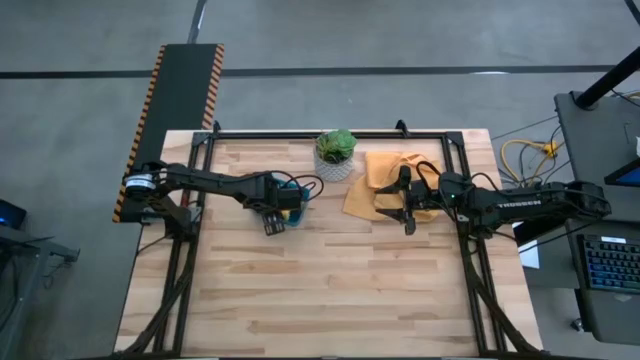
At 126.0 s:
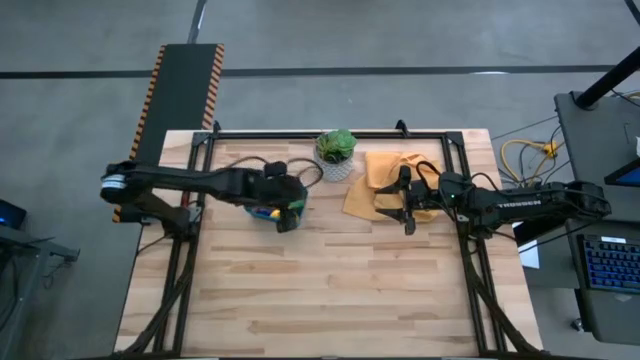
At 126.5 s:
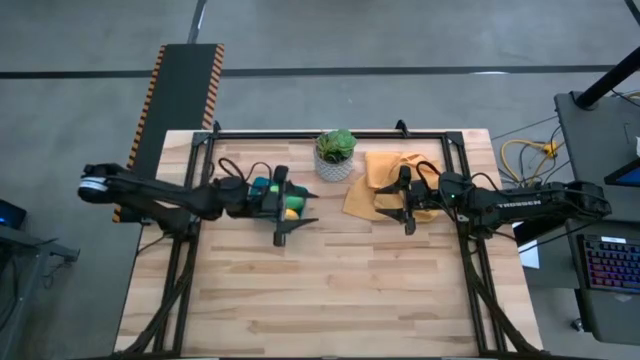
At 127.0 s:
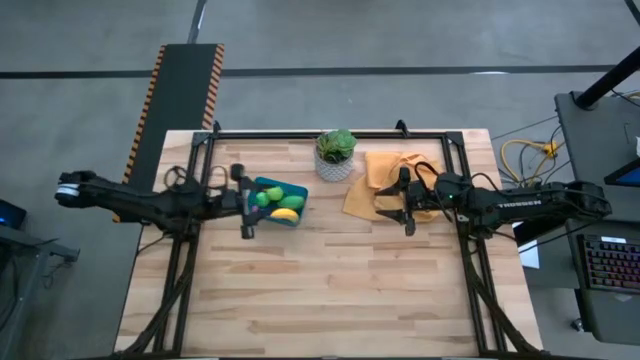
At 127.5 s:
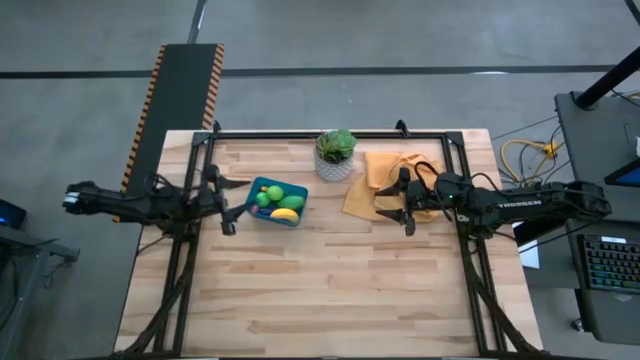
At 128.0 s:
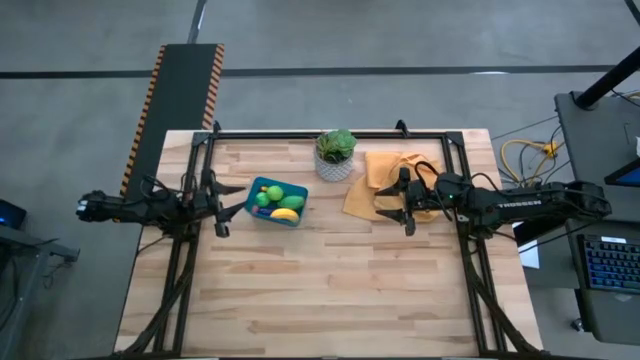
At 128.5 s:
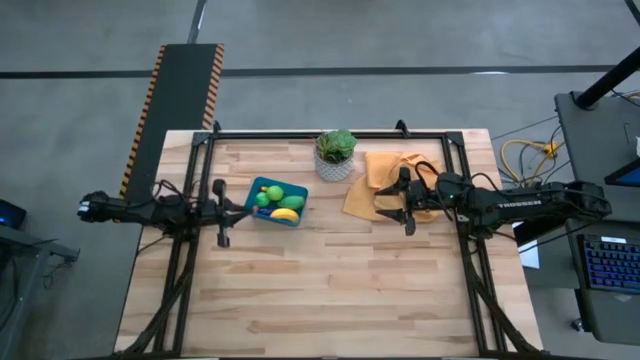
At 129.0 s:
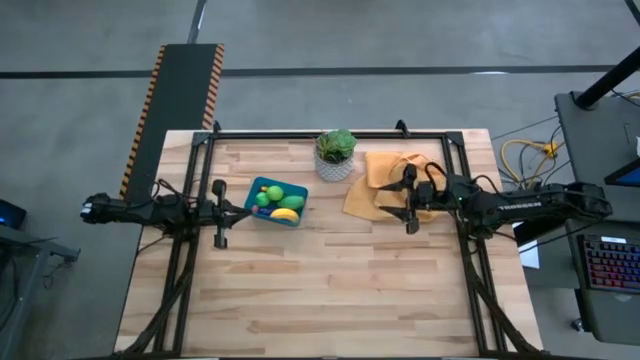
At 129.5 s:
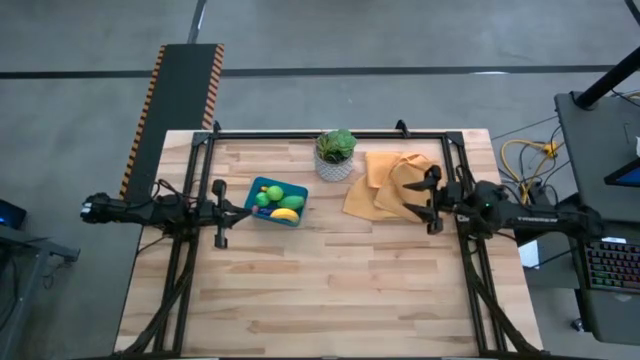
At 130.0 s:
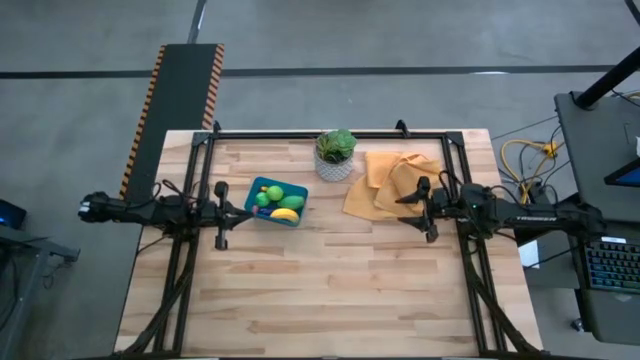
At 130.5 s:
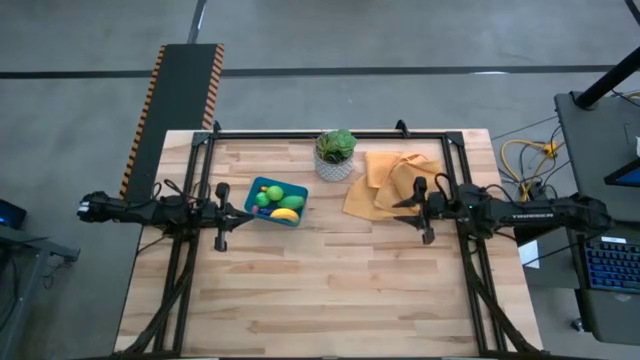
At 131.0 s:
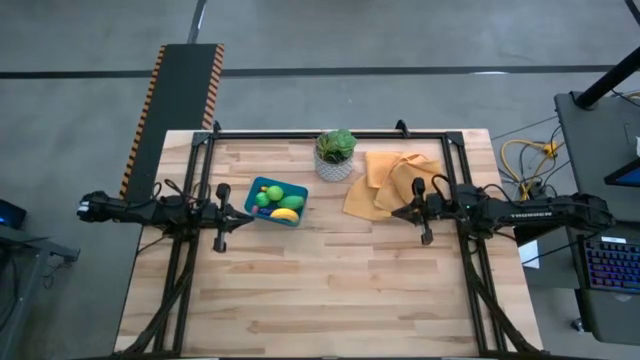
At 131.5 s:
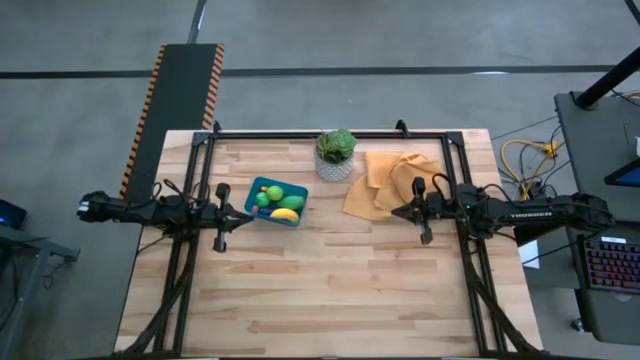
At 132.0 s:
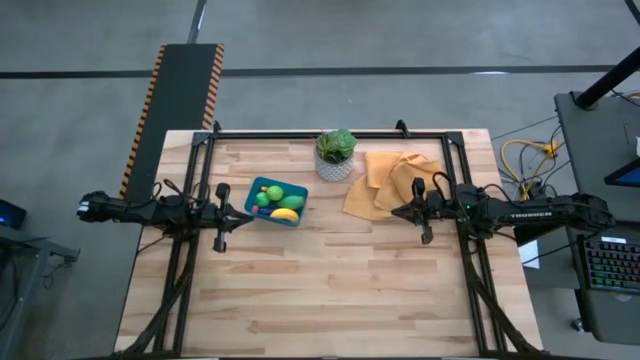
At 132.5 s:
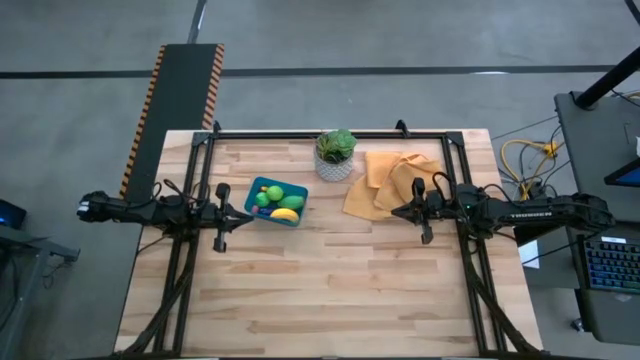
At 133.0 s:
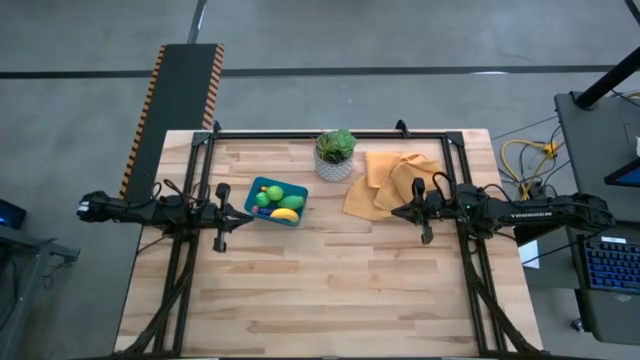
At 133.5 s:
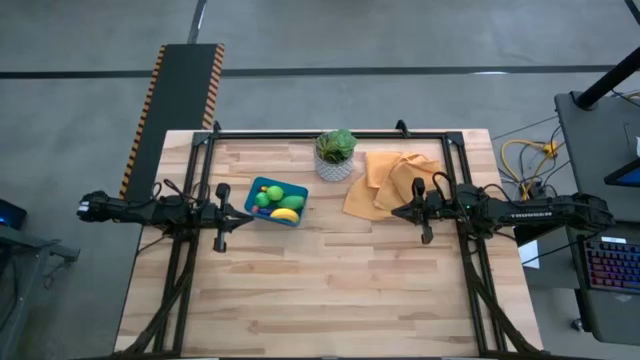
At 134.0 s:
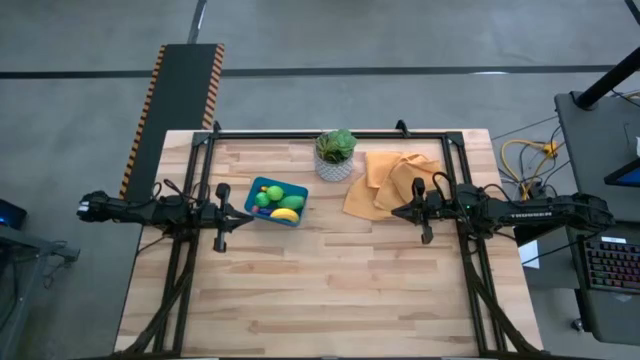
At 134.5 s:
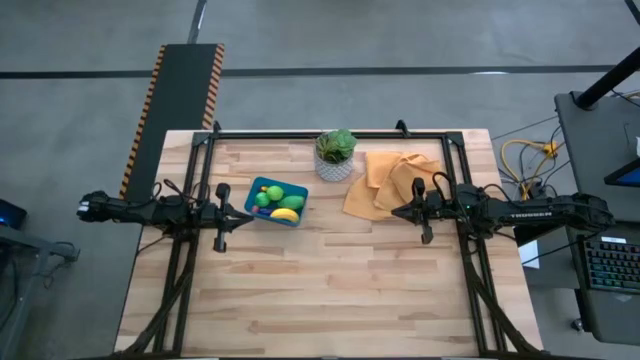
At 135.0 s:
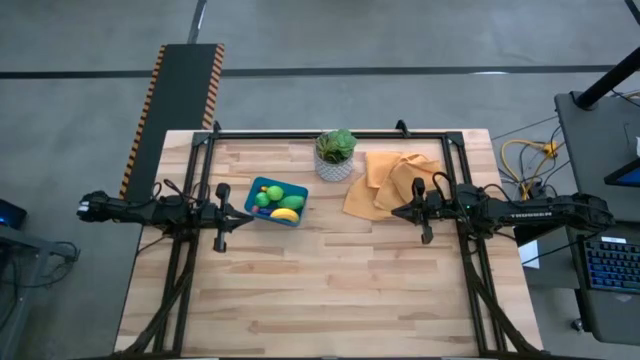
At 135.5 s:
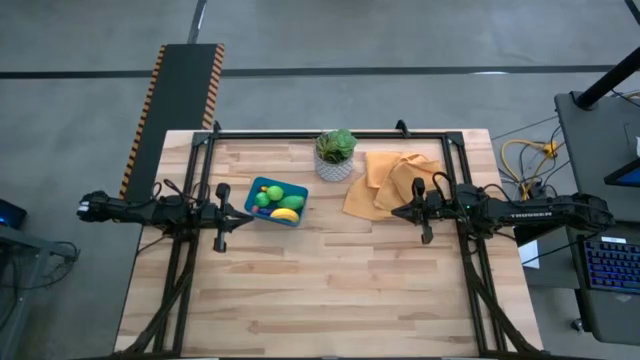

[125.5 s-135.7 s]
Task: Pick and placing Produce into tupperware
Return to Home Position

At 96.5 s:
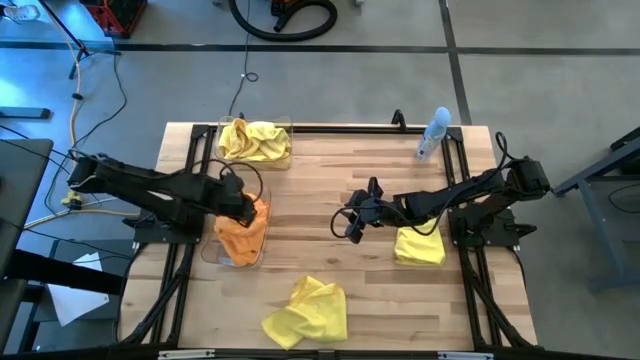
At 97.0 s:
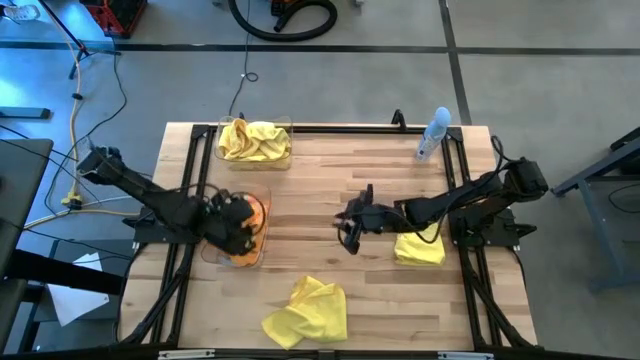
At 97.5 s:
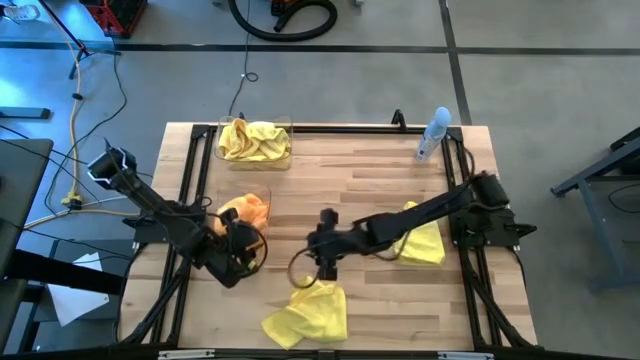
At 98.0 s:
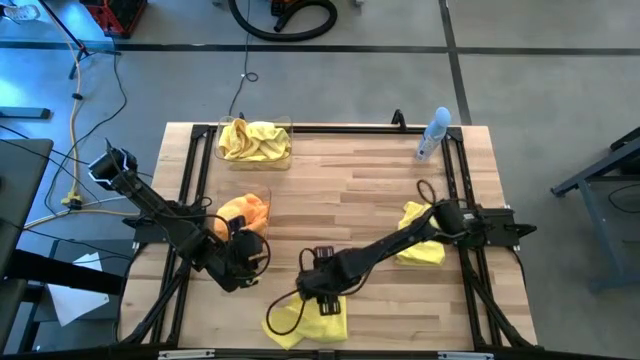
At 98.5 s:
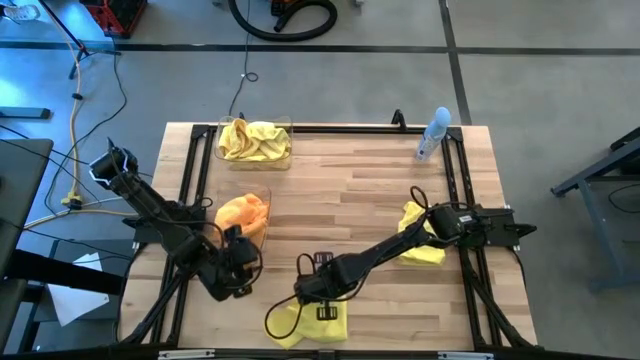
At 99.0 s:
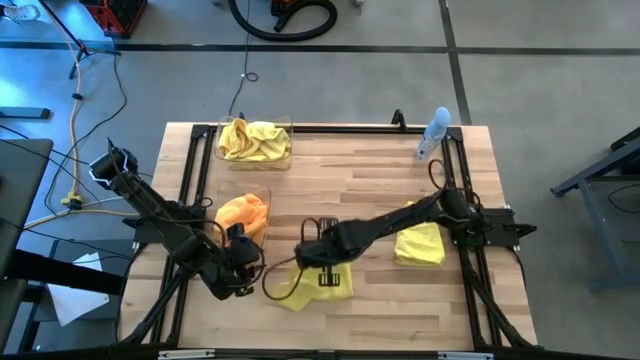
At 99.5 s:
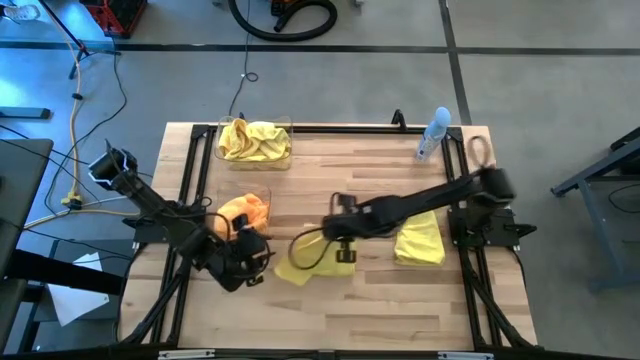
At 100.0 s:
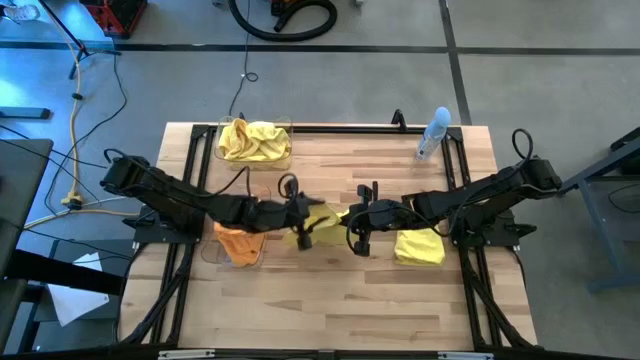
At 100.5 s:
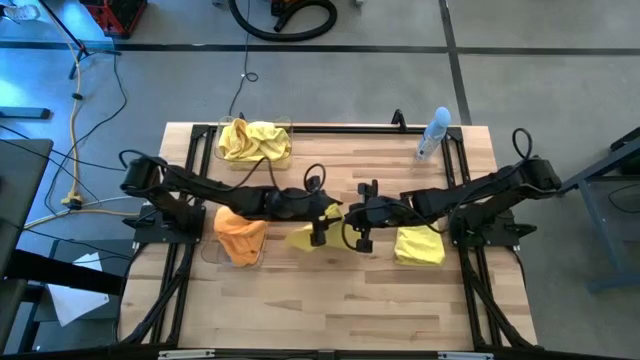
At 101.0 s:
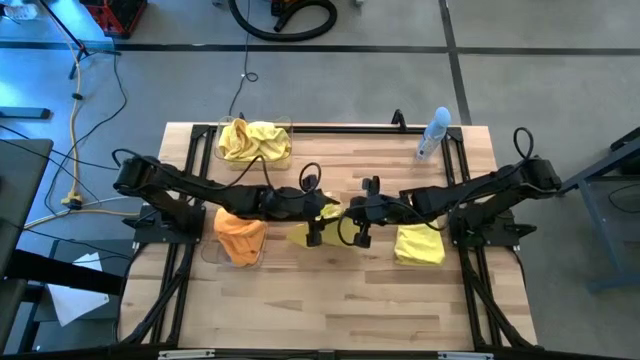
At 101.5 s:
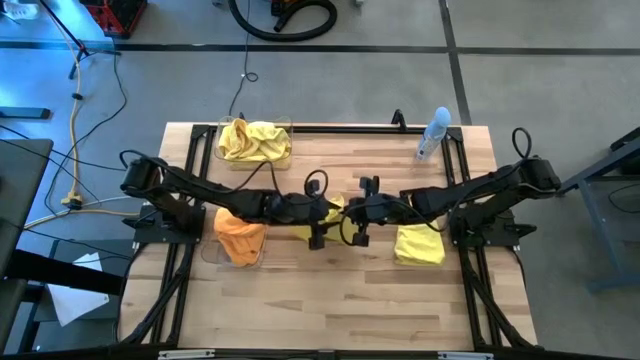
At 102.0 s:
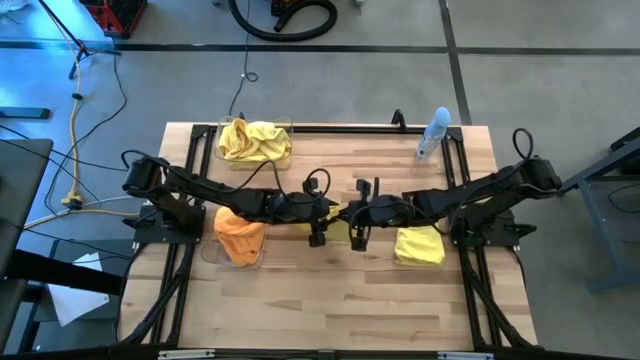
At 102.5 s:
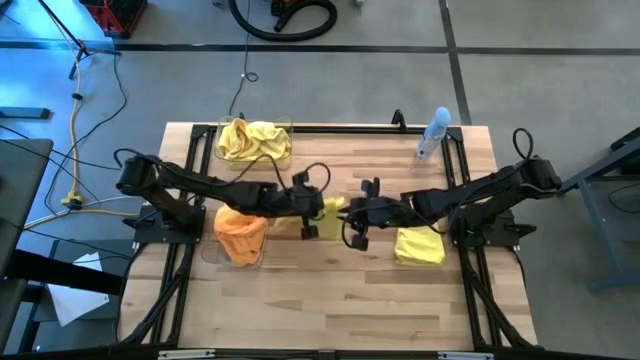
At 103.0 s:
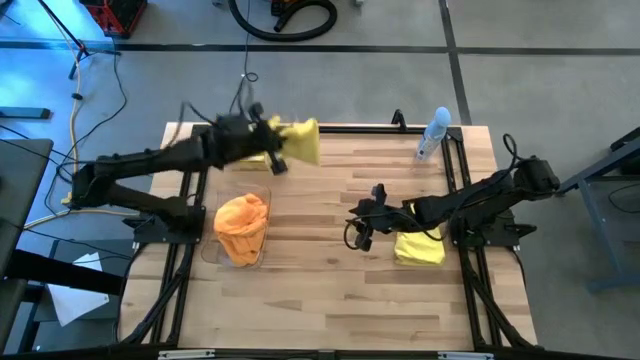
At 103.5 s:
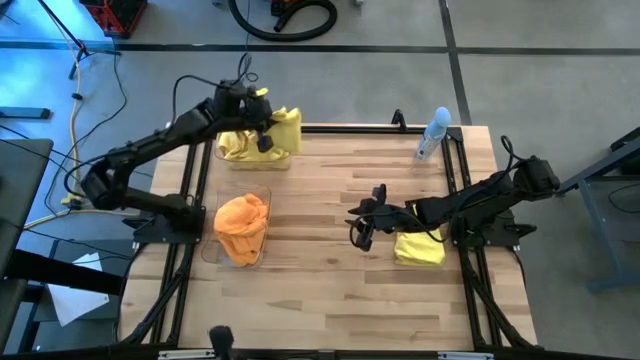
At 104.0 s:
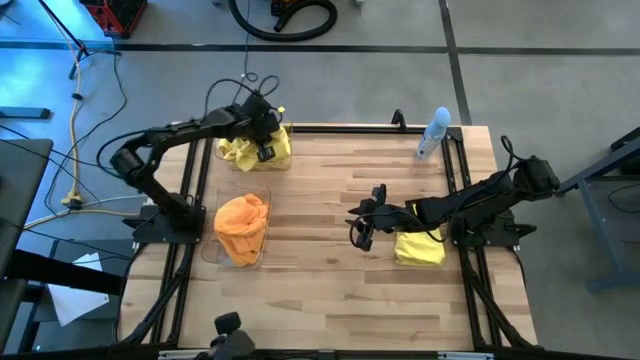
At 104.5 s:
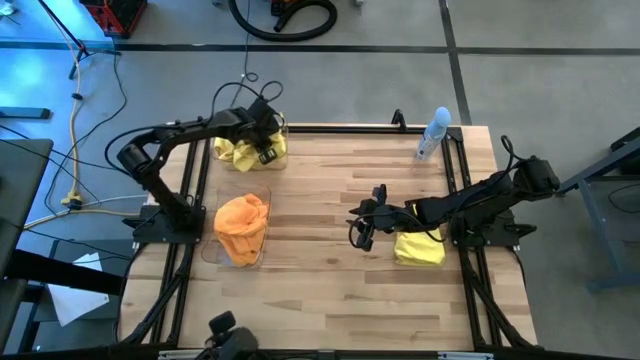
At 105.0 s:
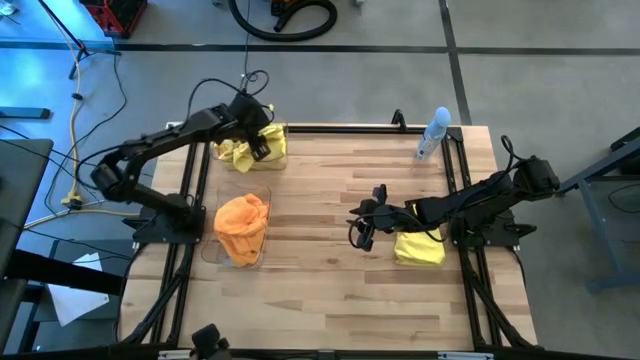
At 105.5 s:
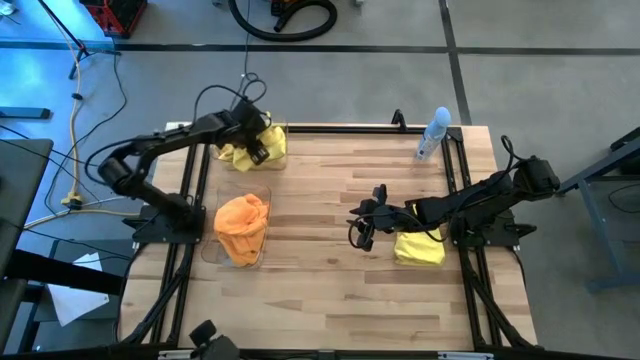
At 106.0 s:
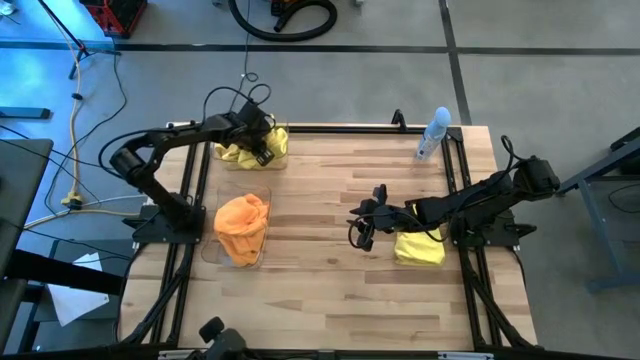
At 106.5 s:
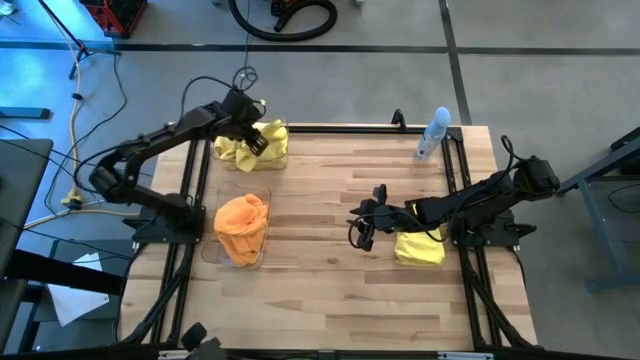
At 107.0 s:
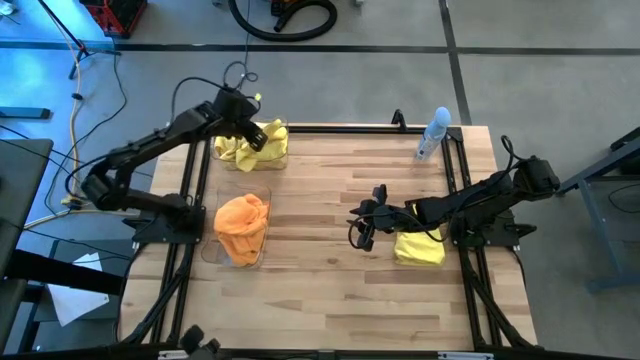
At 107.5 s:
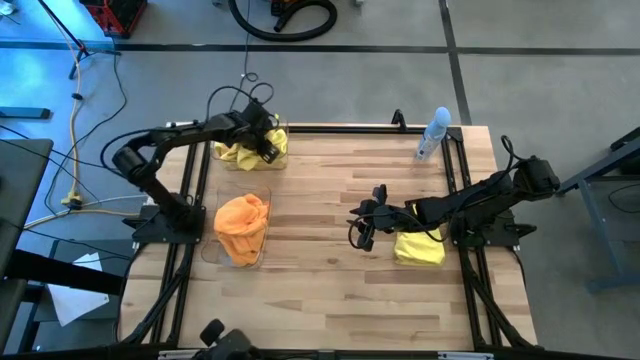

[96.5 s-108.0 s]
Task: Sort microfiber towel by color & place in baskets
Put the yellow microfiber towel into the top transparent bin
